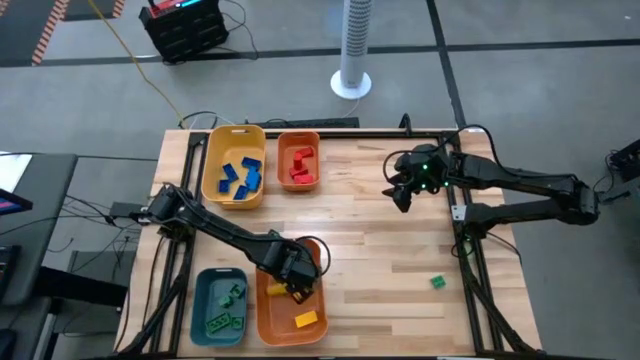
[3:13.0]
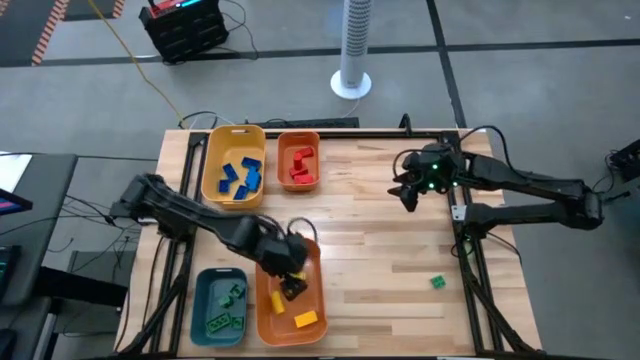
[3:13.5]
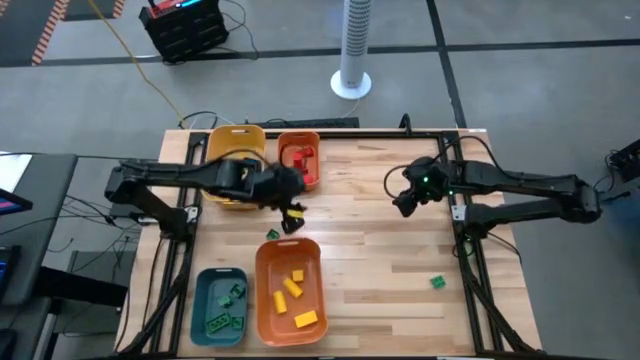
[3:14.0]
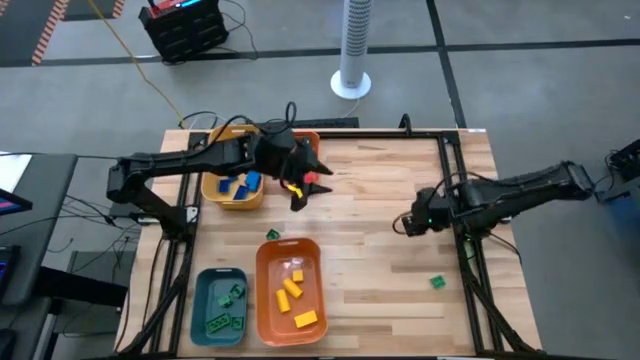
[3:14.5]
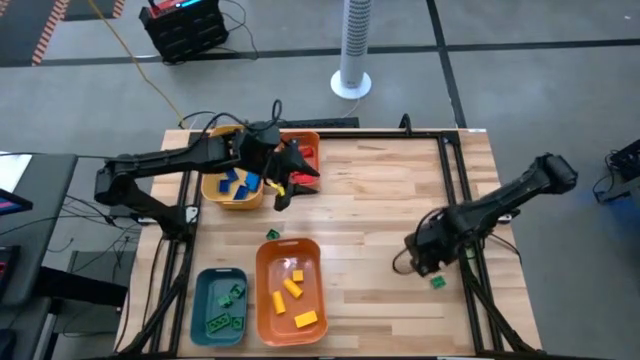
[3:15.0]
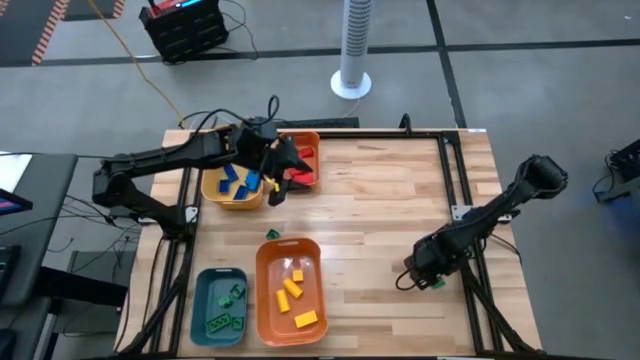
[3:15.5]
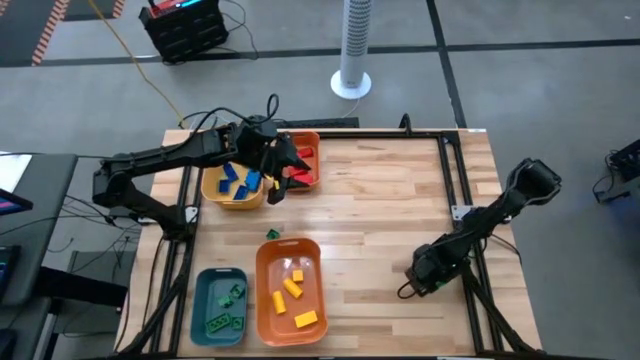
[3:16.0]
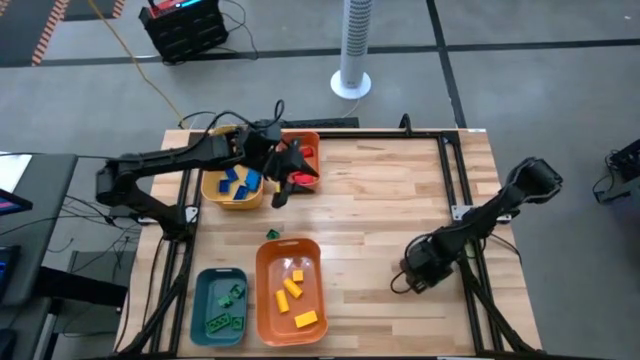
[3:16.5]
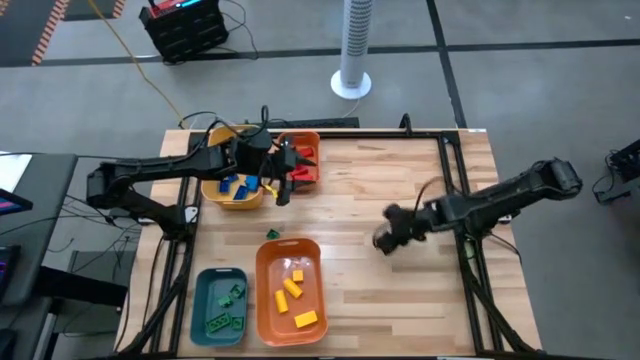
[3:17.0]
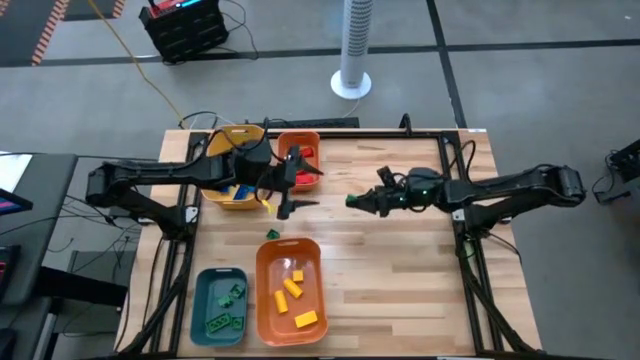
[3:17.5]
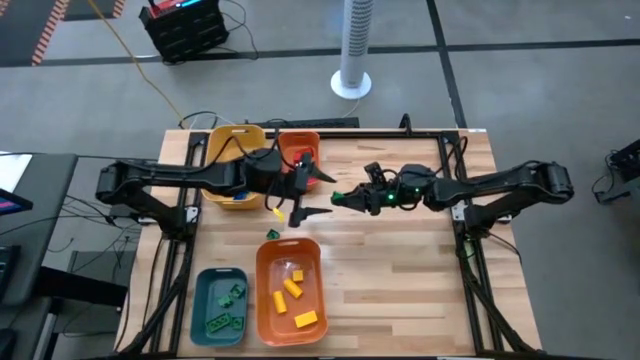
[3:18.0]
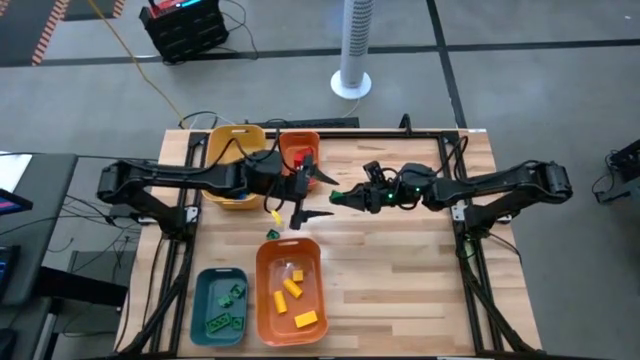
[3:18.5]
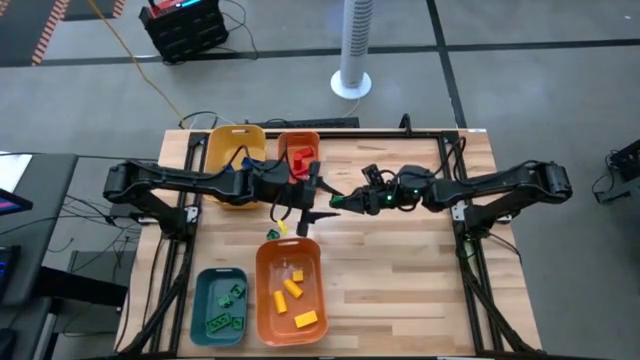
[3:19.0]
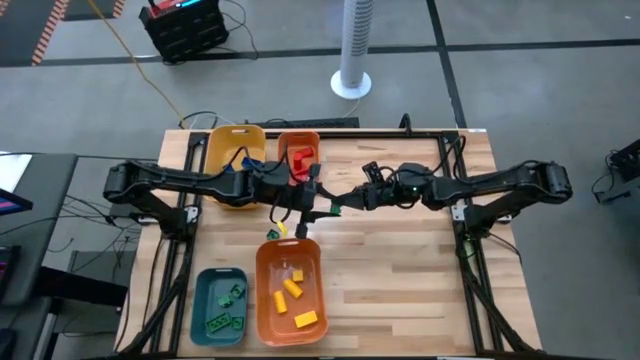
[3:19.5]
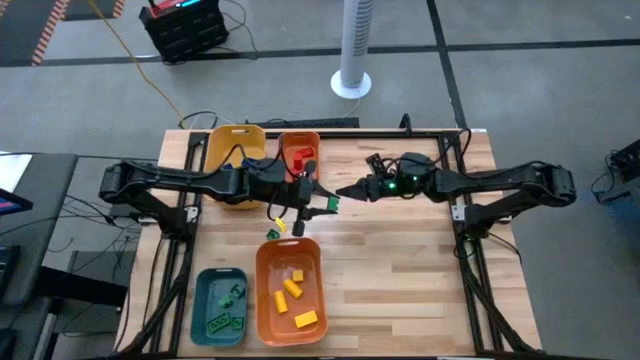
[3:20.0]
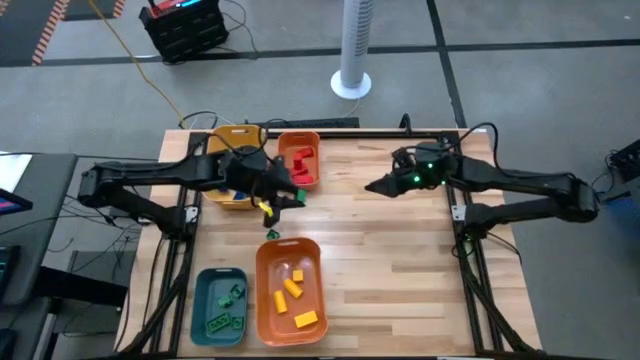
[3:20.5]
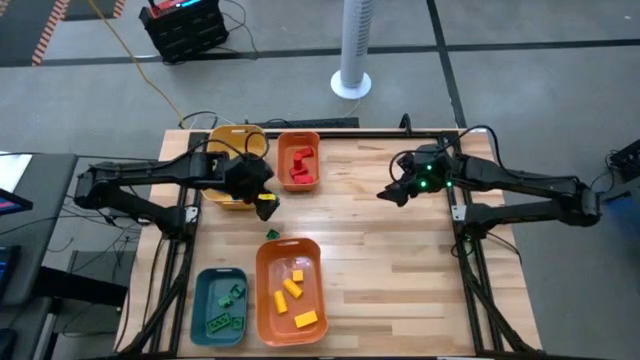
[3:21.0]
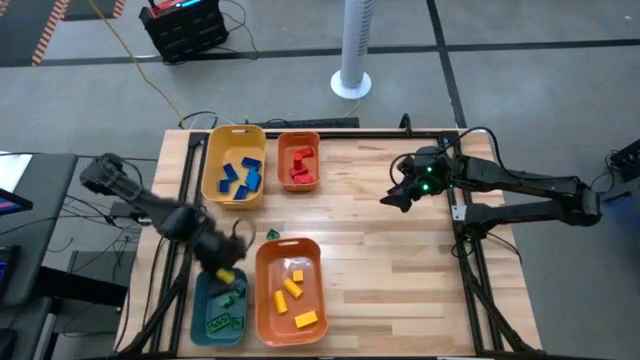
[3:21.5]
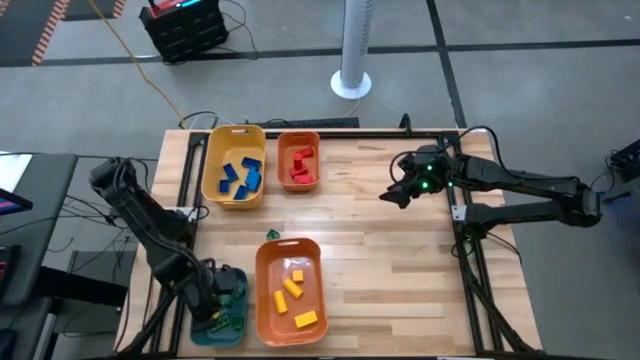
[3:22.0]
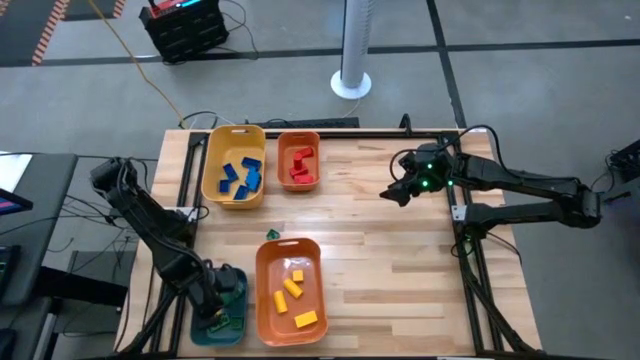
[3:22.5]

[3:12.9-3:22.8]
Task: Sort blocks
Put the green game piece into the blue bin

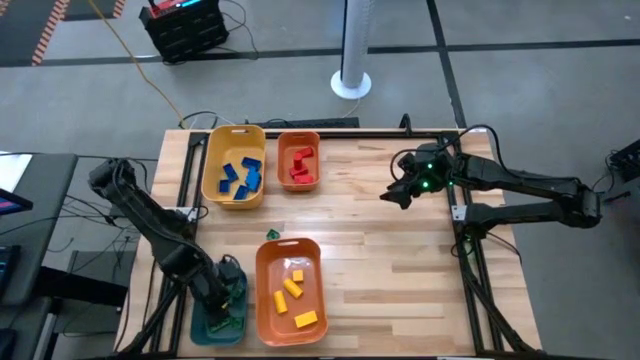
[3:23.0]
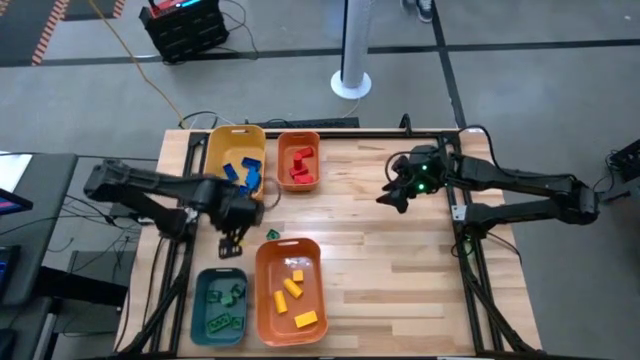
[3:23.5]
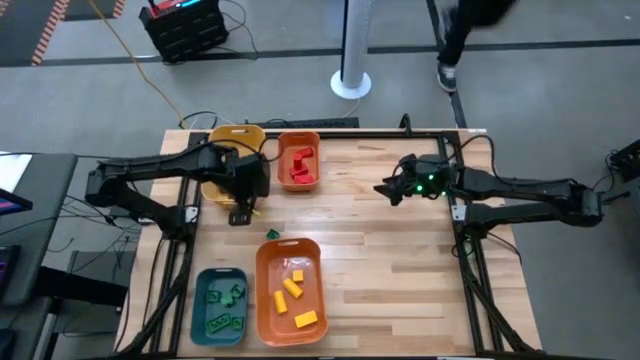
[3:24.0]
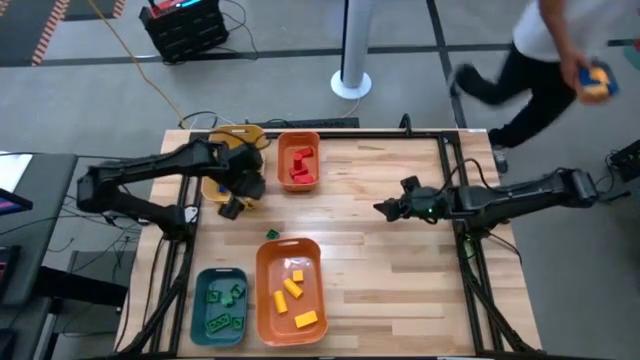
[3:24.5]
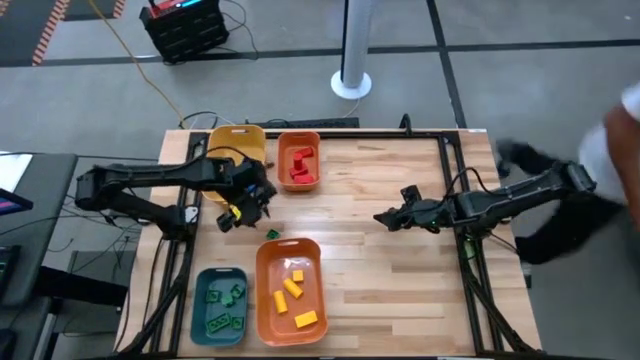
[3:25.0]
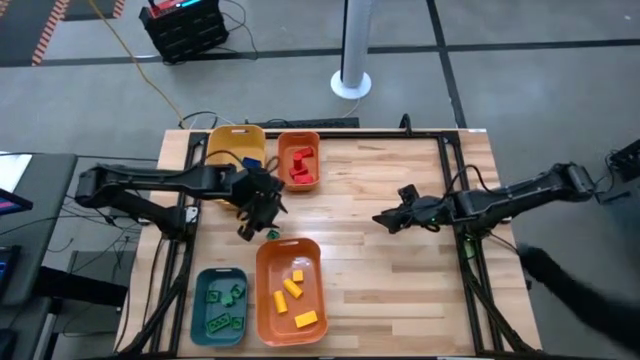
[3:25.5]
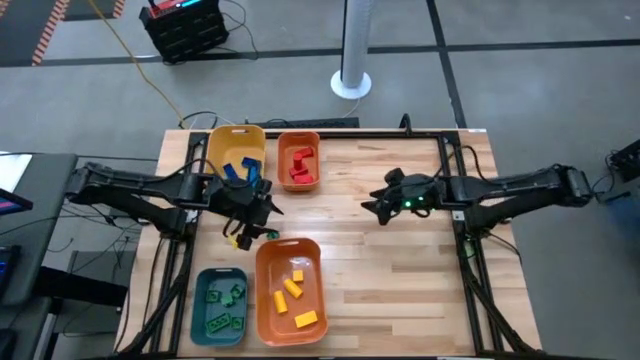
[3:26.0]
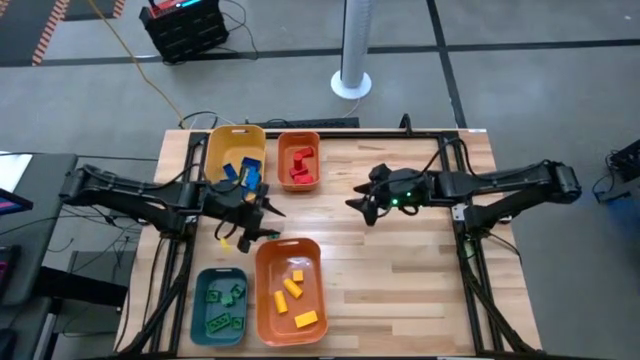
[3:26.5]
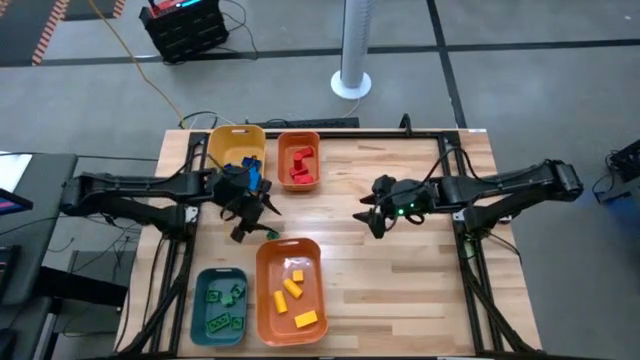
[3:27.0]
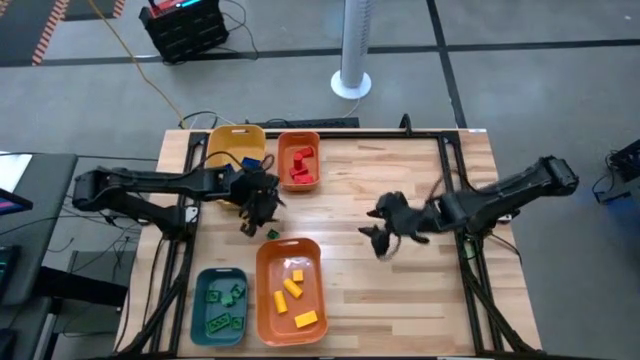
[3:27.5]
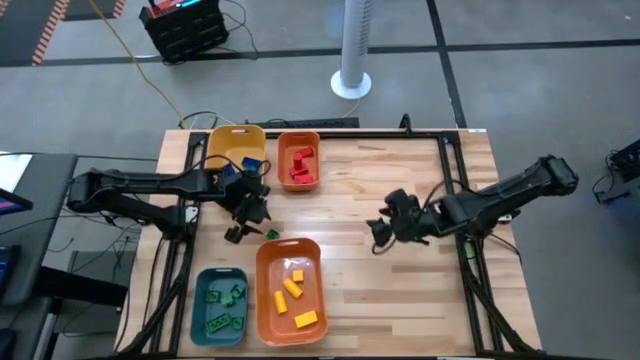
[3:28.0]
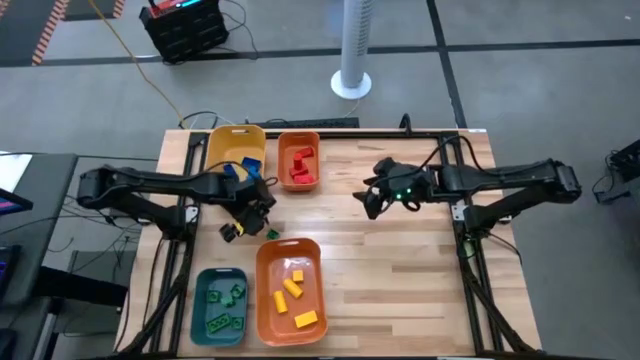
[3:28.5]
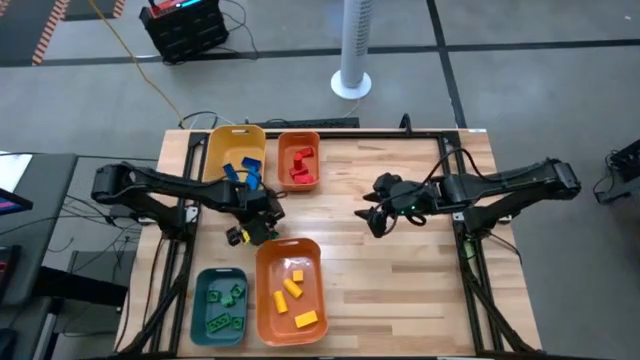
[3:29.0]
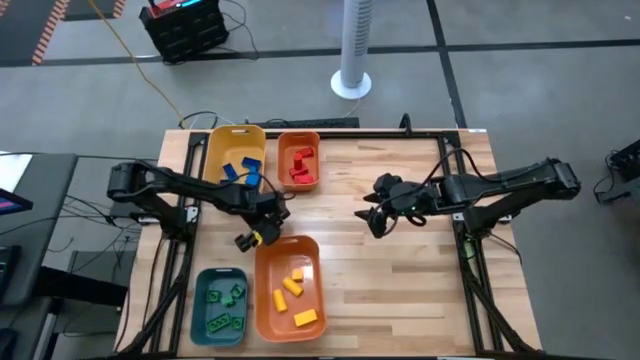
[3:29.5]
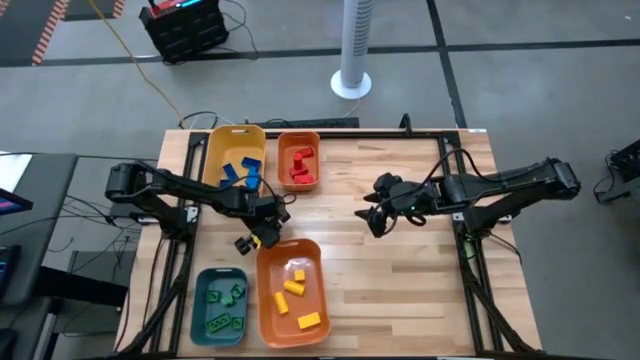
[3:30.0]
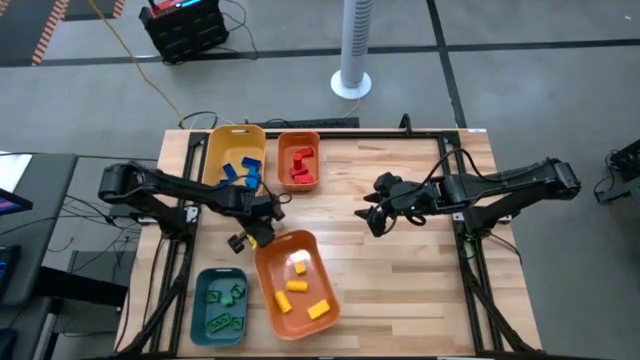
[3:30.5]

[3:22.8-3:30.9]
Put the green game piece into the blue bin

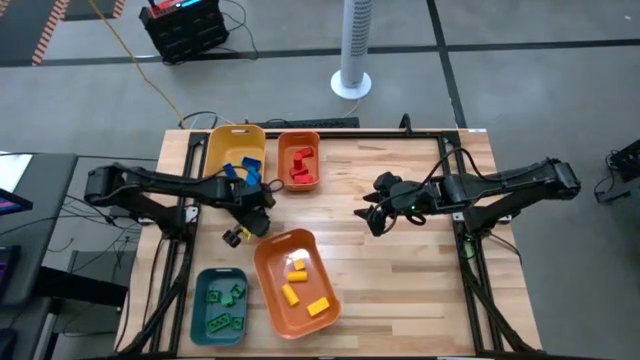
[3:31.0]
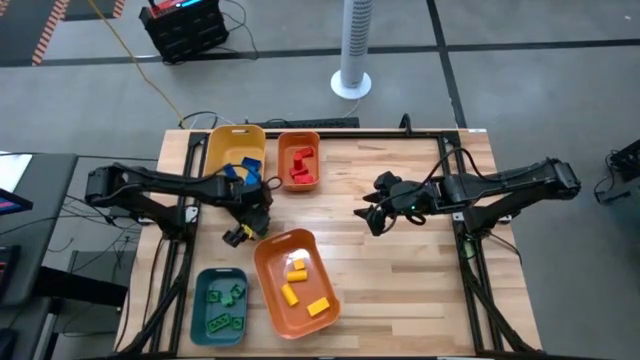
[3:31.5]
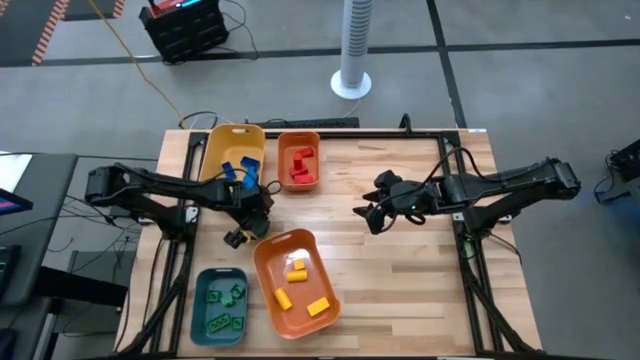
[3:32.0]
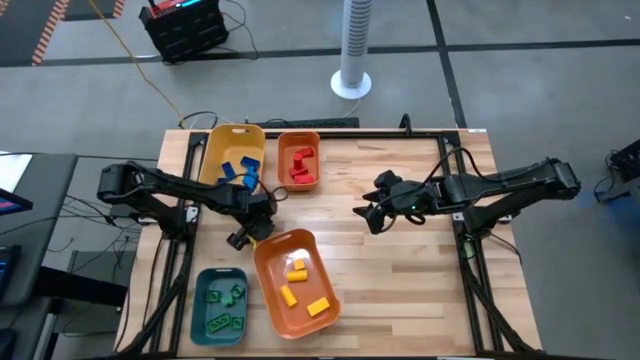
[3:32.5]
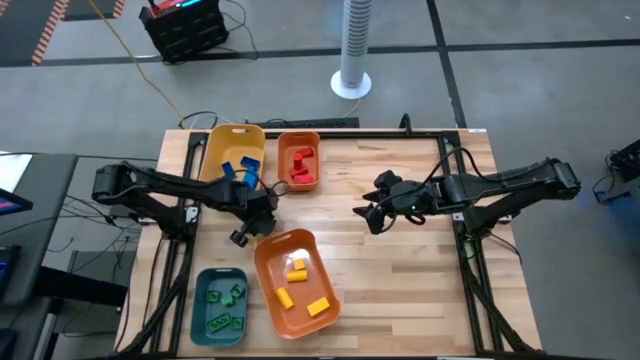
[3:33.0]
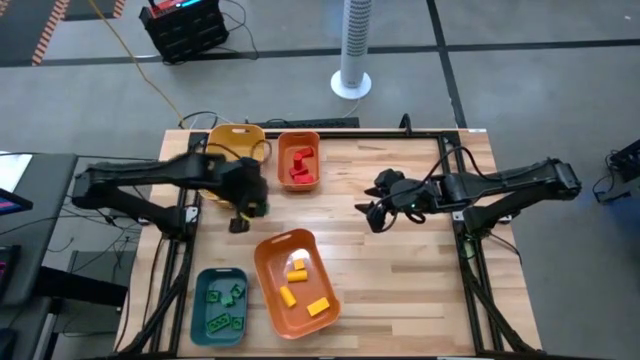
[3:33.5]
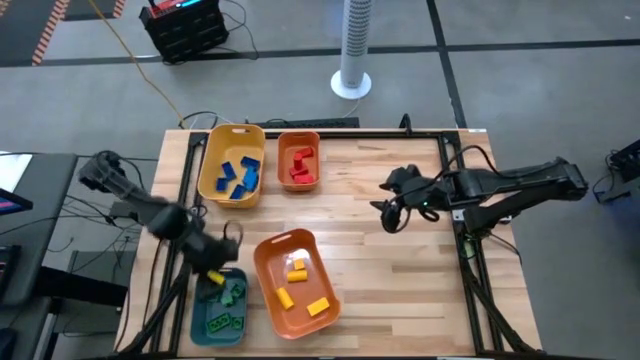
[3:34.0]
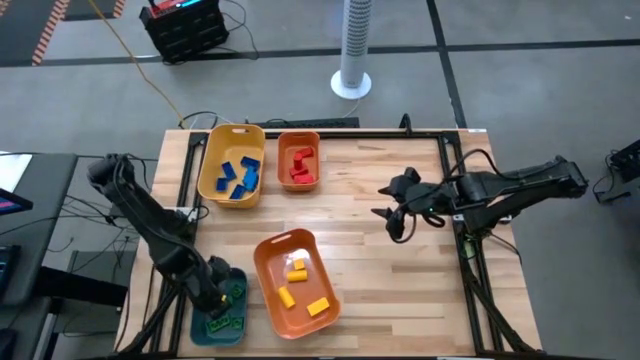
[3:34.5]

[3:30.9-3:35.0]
Put the green game piece into the blue bin
